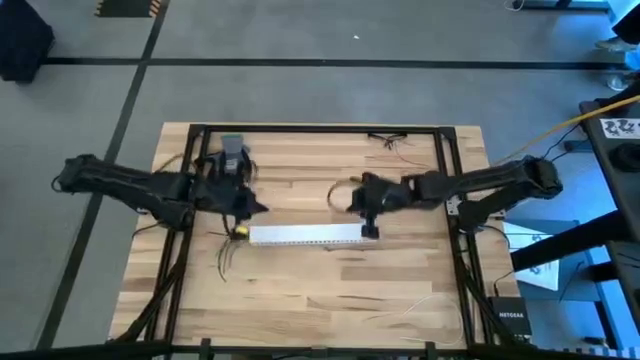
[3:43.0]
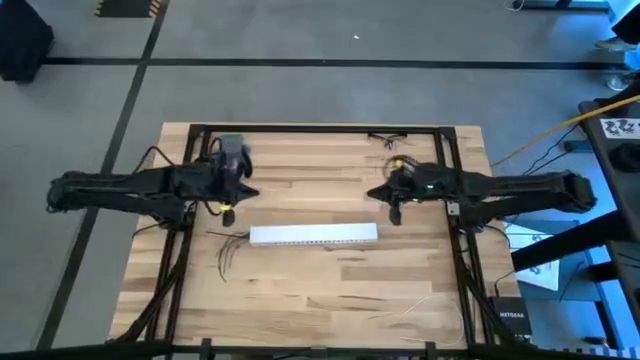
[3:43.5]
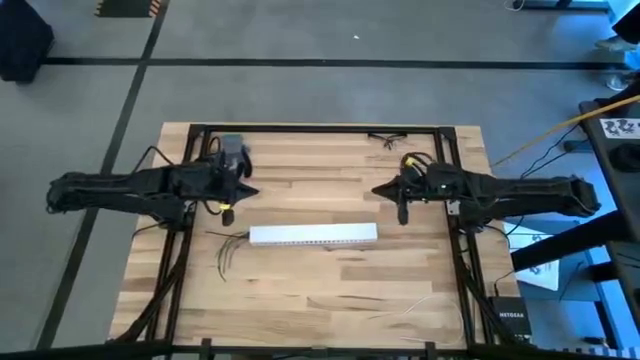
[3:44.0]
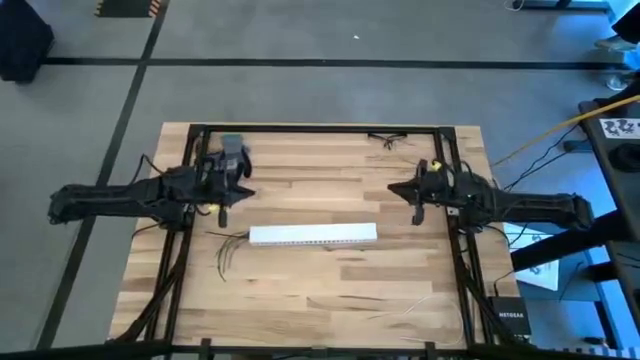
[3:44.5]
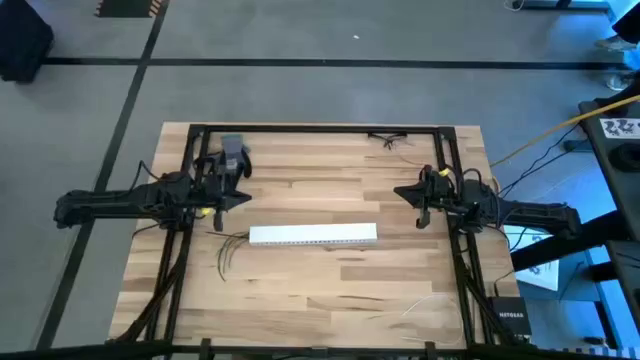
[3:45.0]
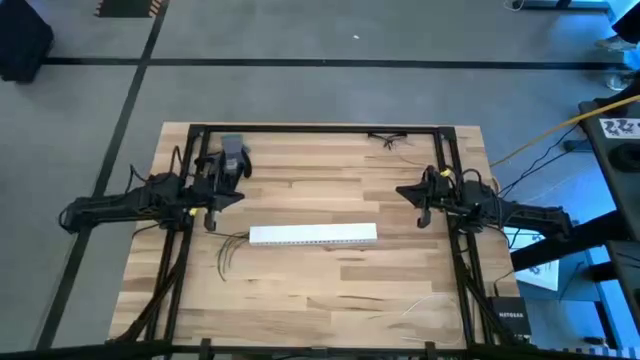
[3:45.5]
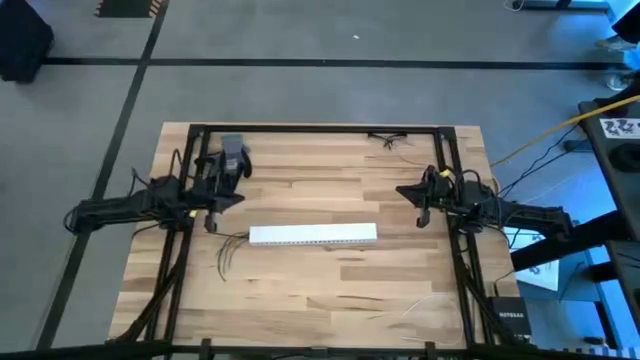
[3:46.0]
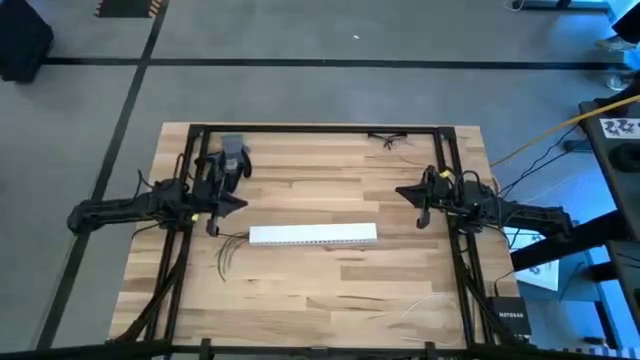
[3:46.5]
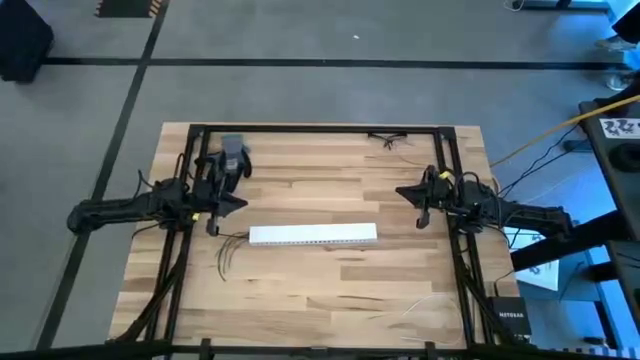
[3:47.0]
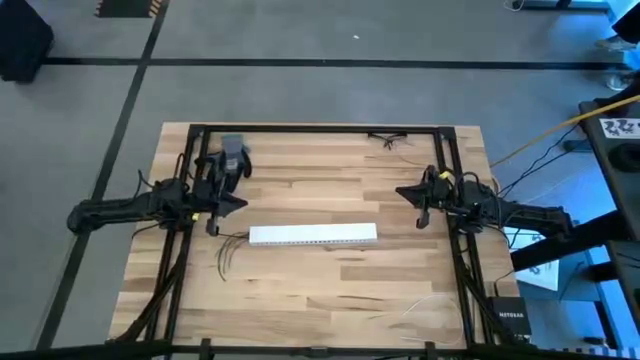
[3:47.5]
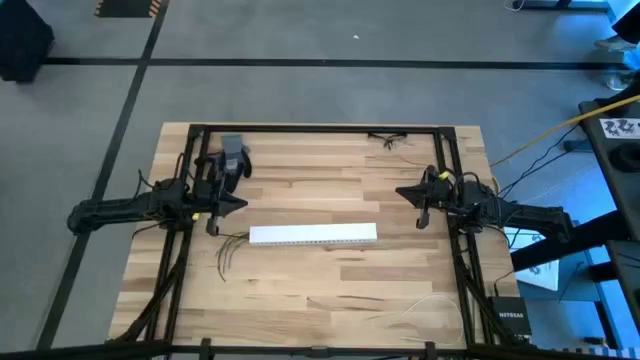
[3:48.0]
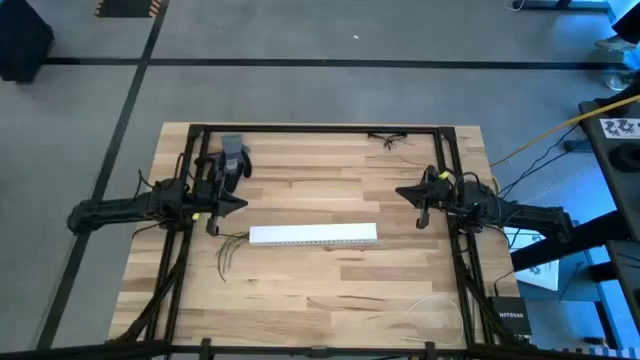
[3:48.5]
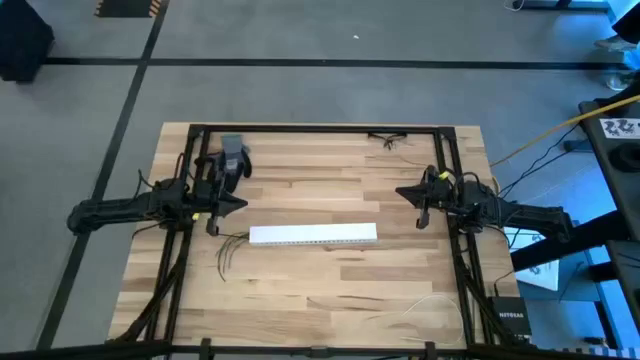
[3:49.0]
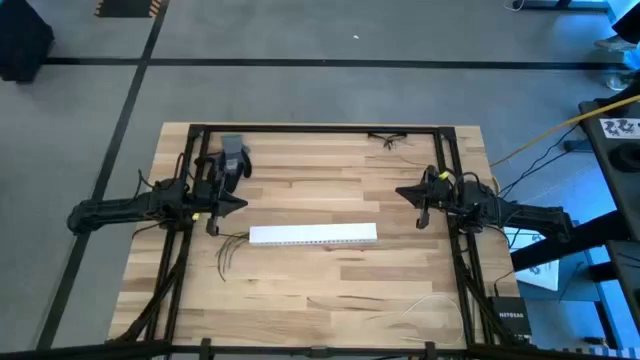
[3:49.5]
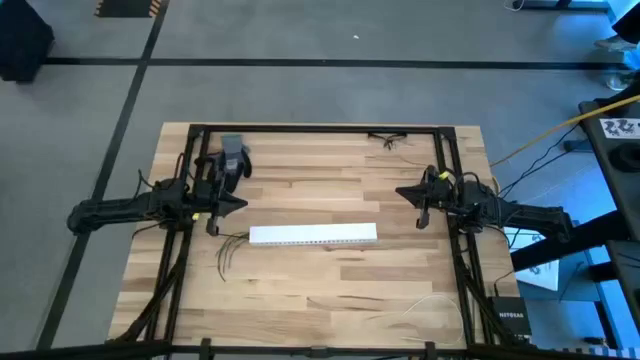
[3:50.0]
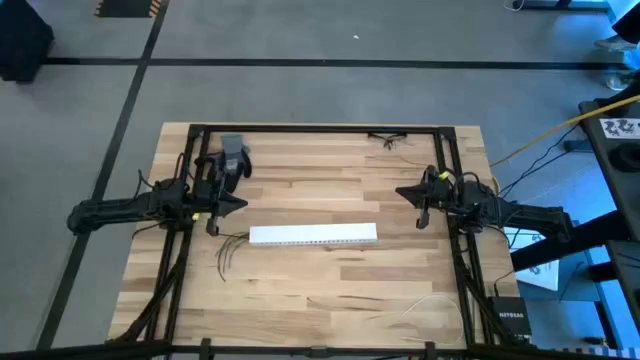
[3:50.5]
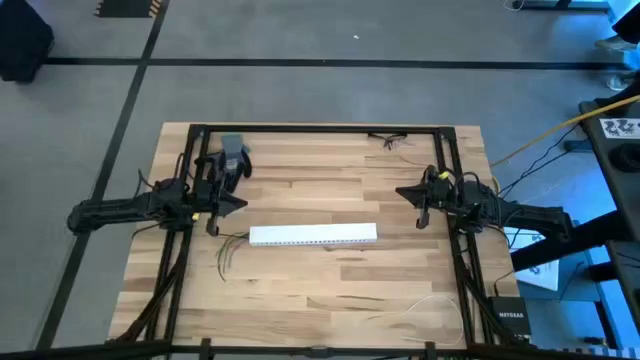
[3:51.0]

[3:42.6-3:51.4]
Task: Ziptie cables
Return to Home Position

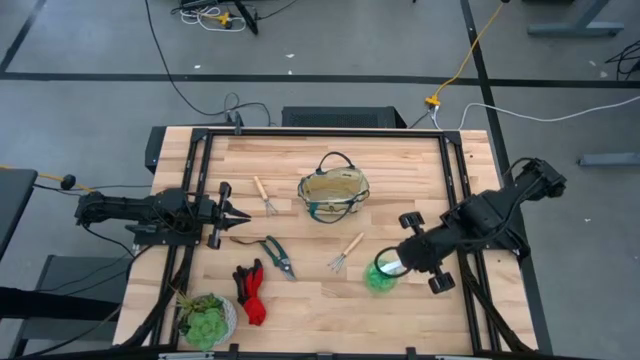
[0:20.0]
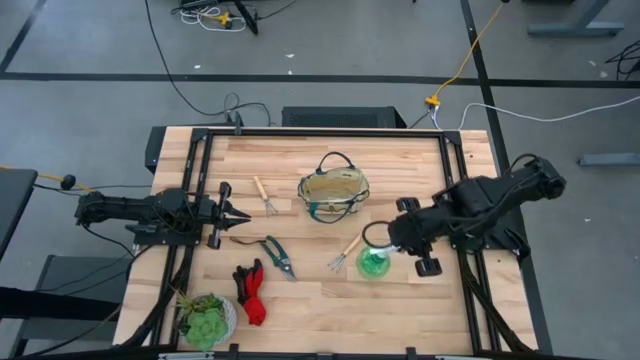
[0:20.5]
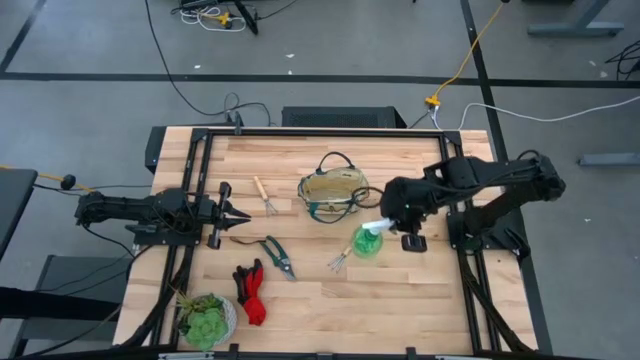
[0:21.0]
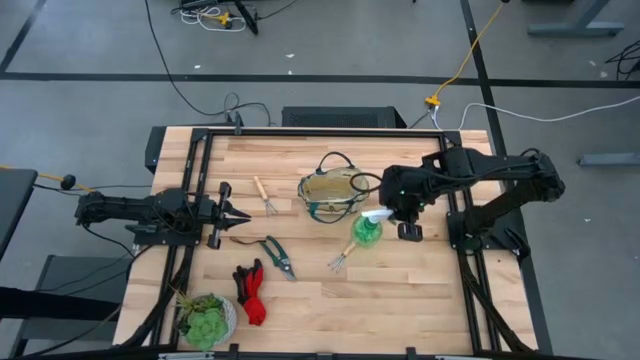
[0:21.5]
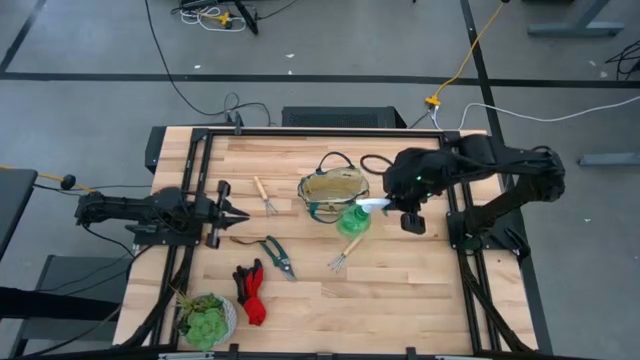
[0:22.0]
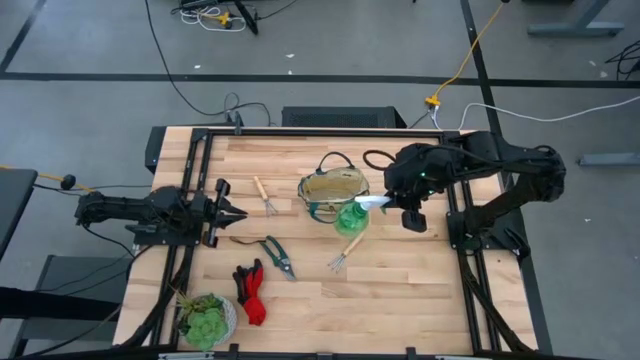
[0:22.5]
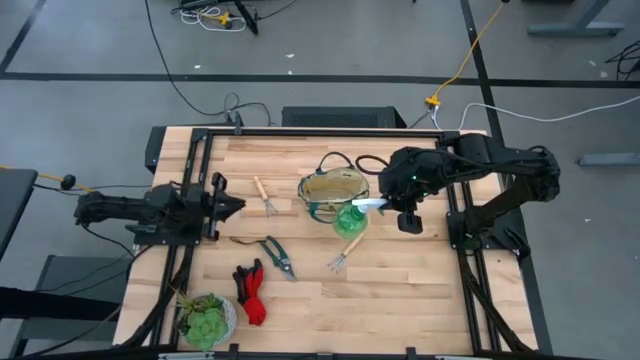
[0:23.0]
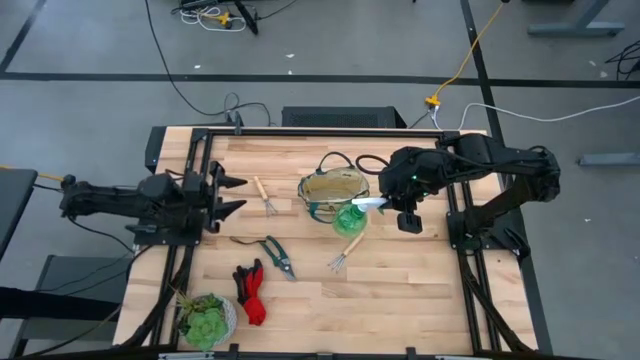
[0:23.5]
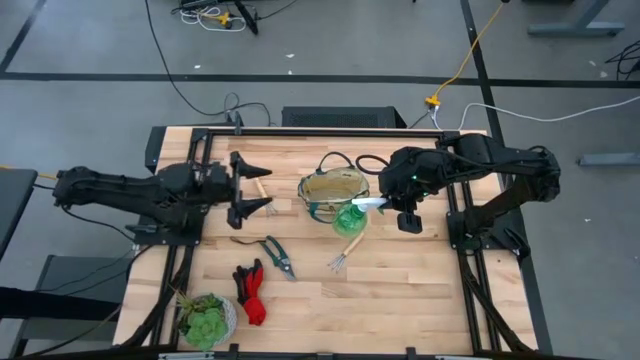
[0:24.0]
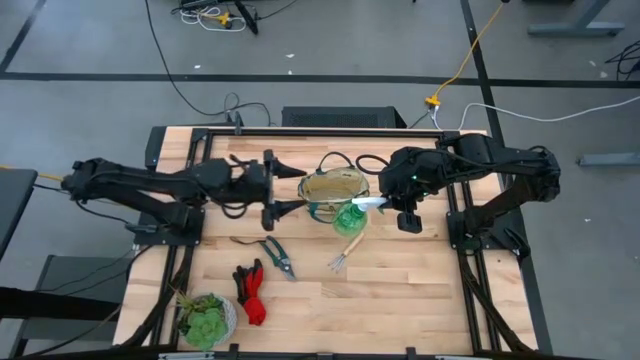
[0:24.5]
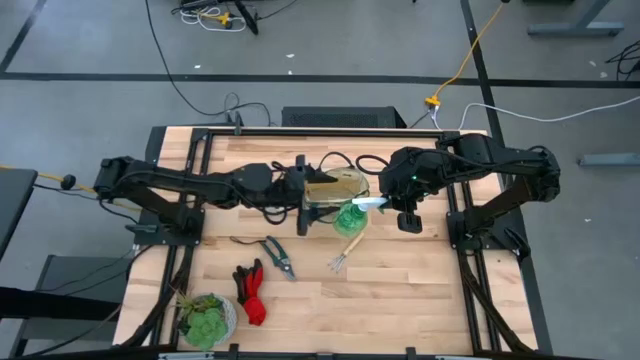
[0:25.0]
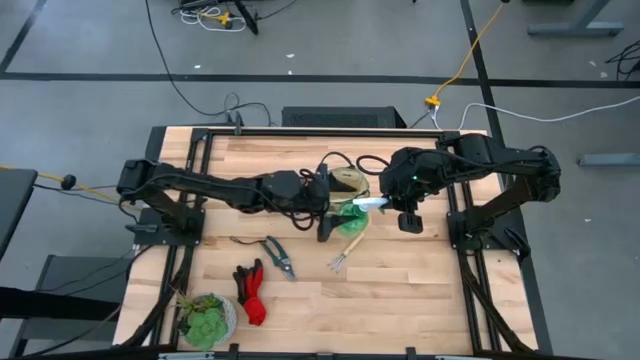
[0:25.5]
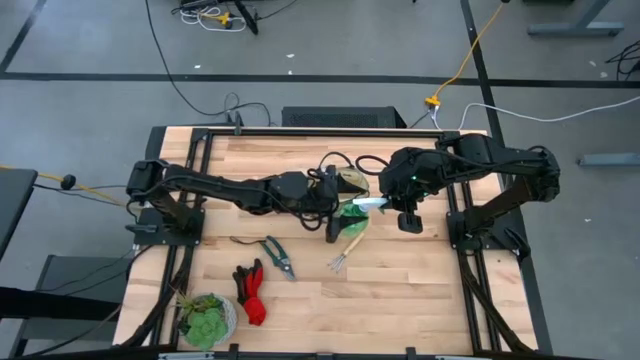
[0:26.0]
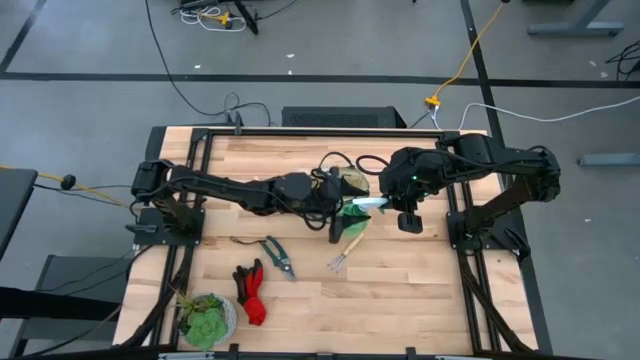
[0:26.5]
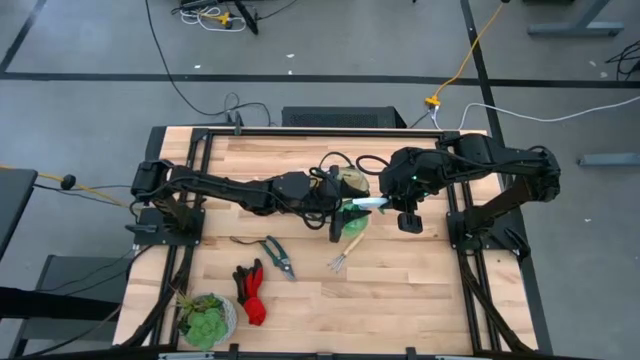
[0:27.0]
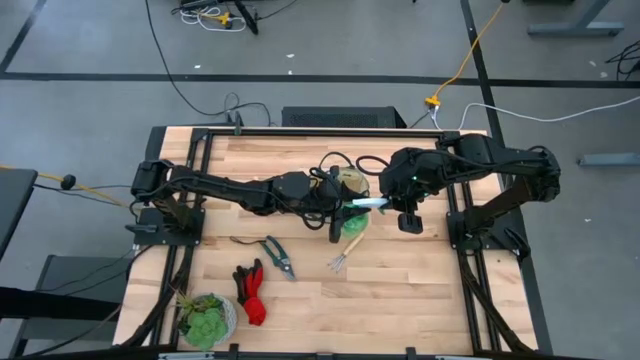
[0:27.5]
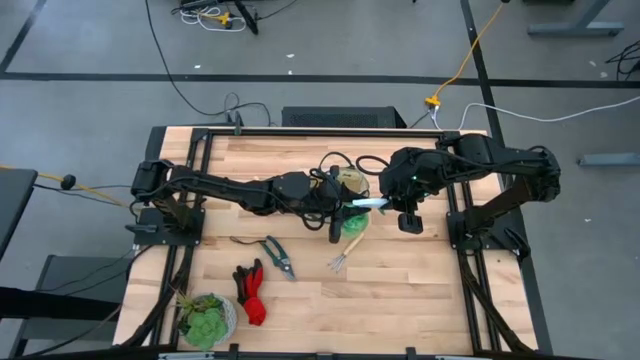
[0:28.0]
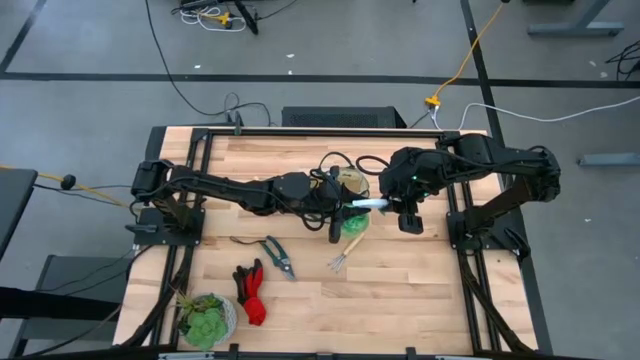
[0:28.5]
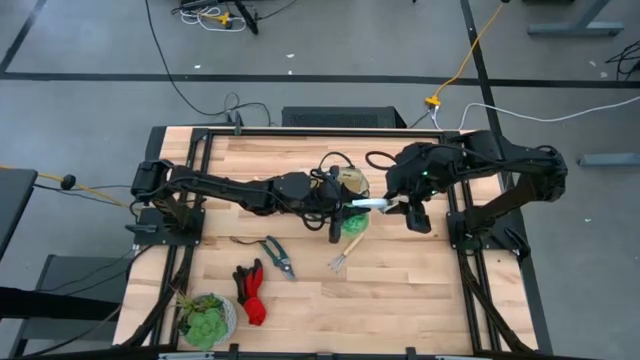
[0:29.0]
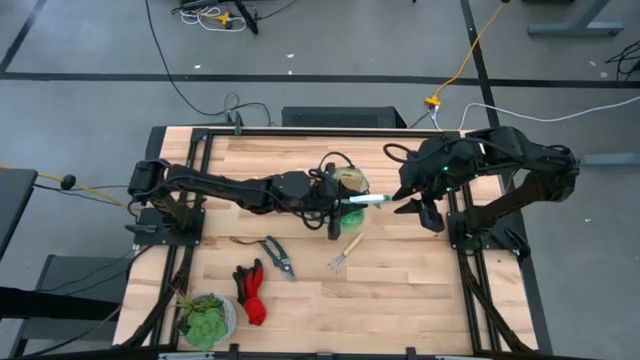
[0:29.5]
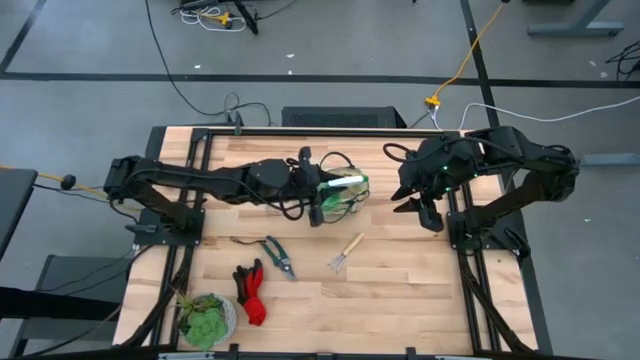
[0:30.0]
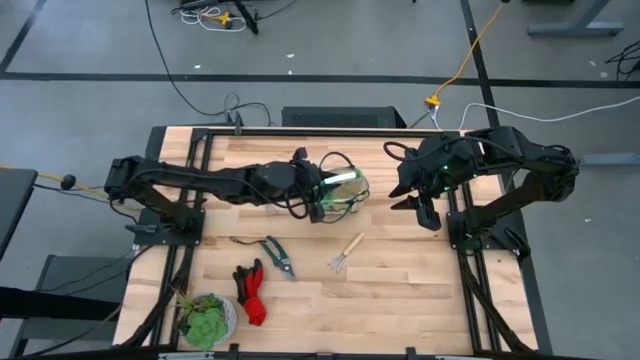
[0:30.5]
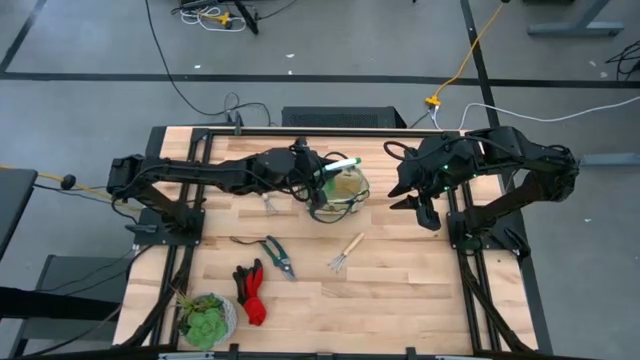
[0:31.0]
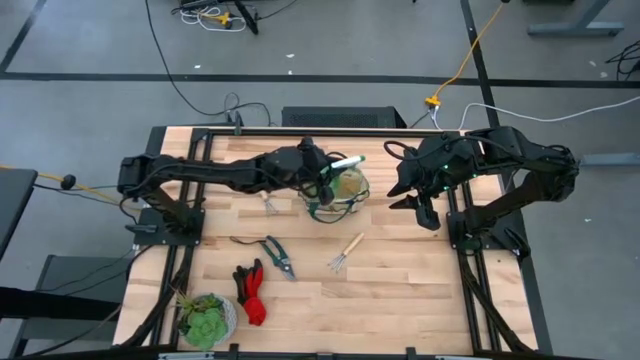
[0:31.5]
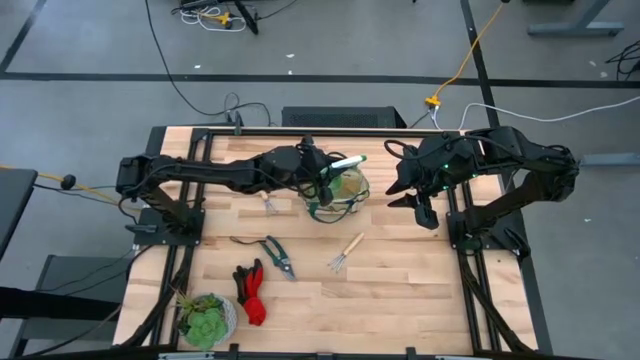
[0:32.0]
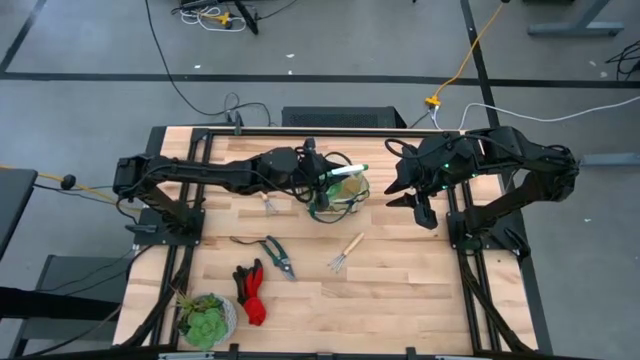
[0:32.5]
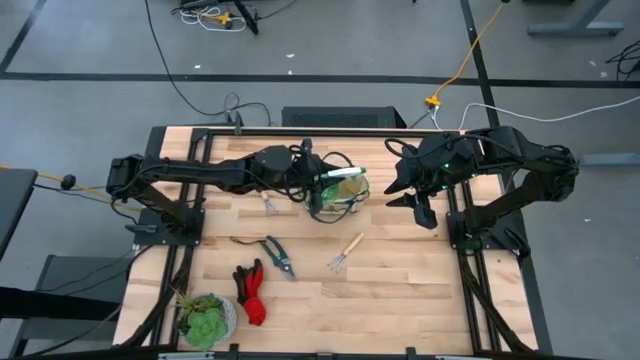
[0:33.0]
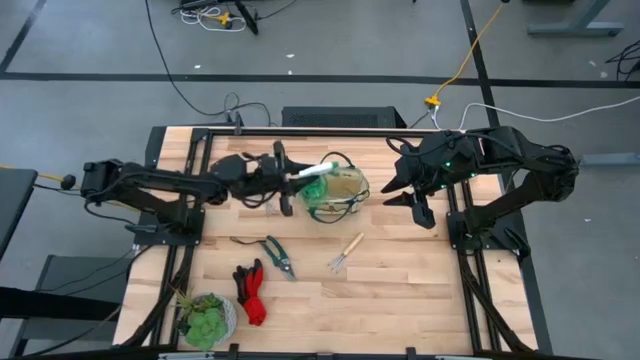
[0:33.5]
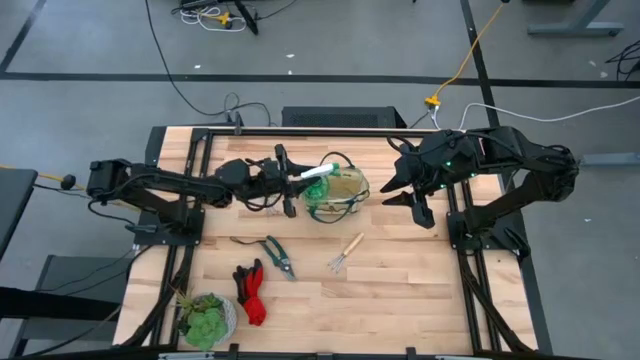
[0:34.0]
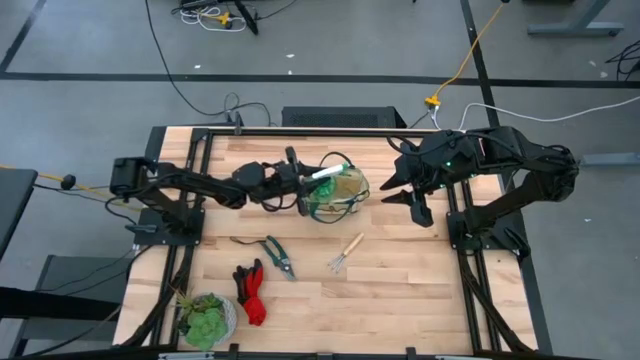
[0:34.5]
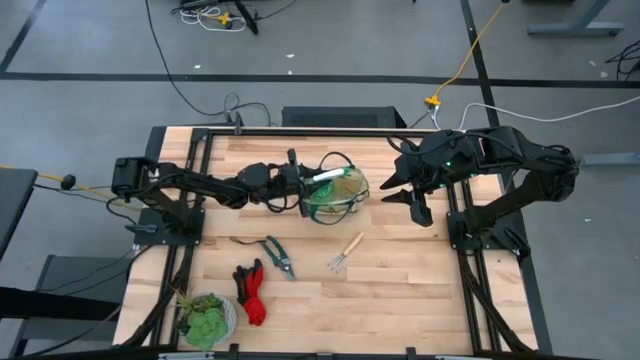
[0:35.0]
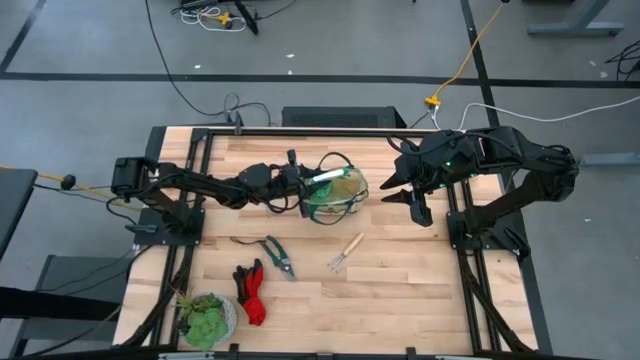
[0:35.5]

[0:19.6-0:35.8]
Task: Pick & Place Garden tools in Gardening bag
Put the green spray bottle into the gardening bag
